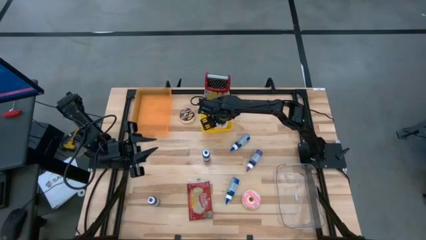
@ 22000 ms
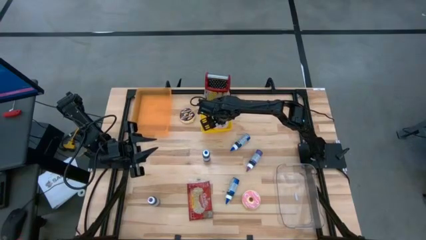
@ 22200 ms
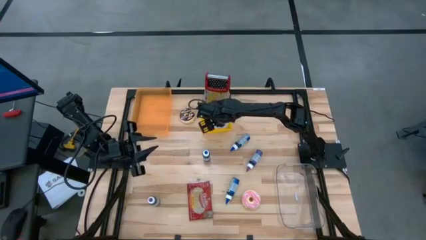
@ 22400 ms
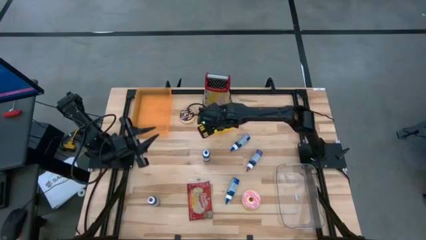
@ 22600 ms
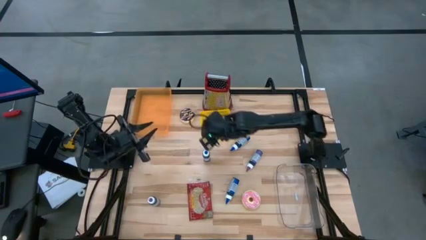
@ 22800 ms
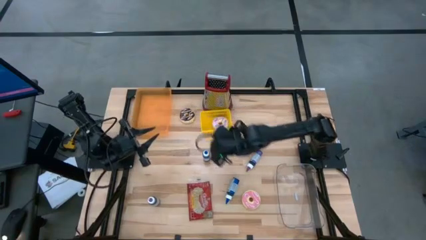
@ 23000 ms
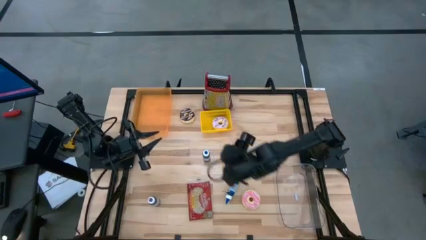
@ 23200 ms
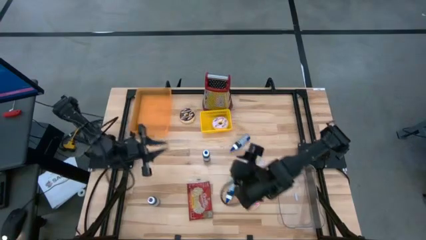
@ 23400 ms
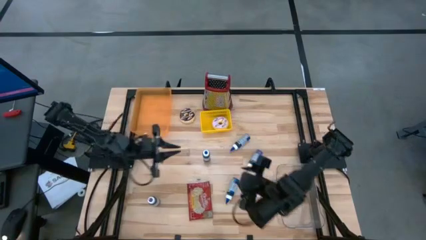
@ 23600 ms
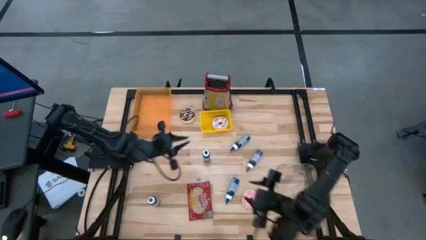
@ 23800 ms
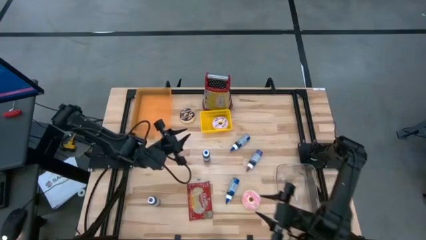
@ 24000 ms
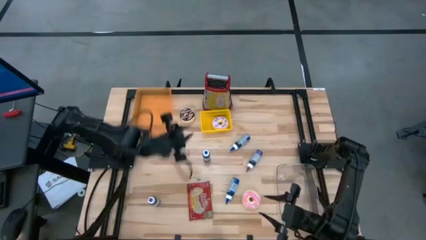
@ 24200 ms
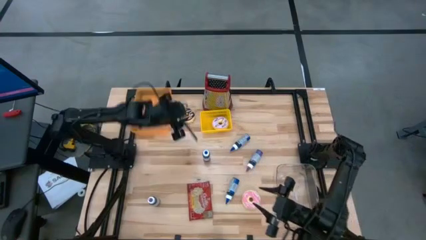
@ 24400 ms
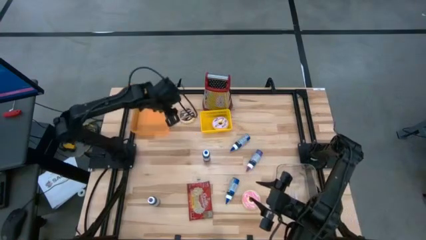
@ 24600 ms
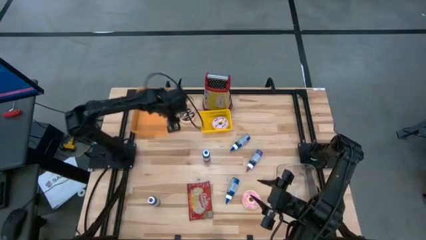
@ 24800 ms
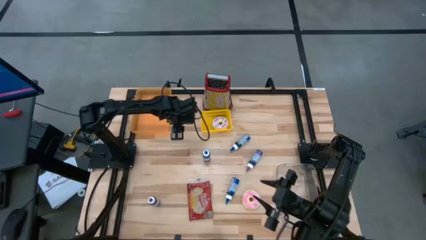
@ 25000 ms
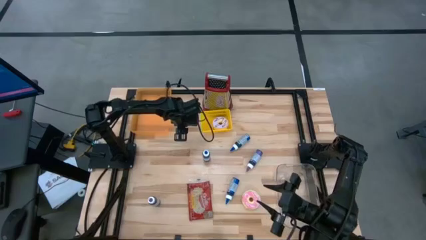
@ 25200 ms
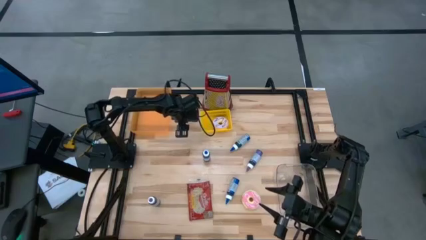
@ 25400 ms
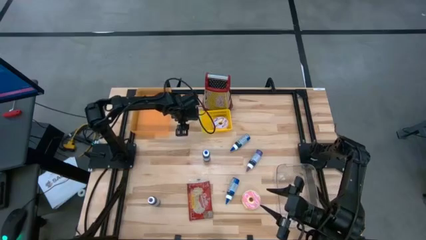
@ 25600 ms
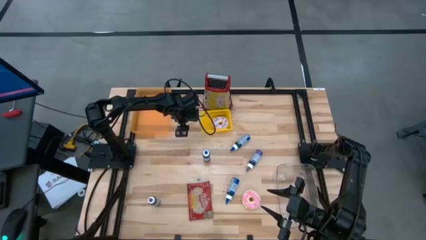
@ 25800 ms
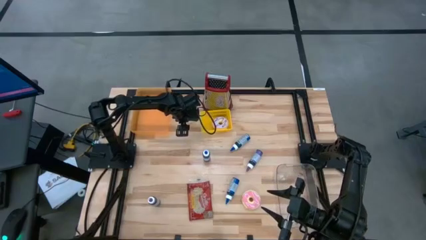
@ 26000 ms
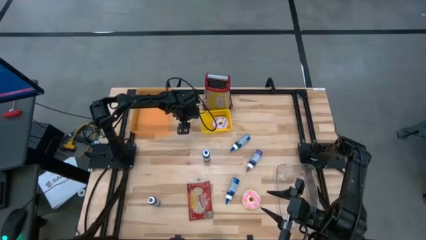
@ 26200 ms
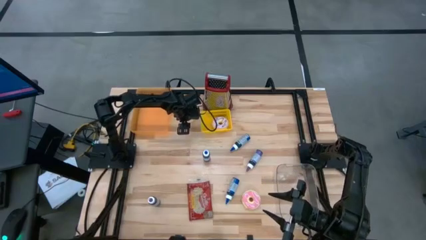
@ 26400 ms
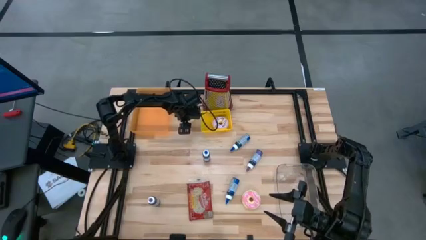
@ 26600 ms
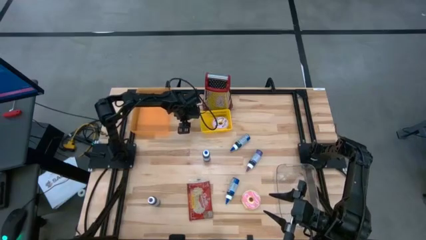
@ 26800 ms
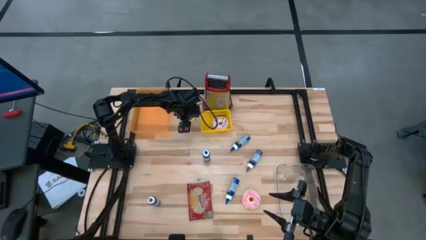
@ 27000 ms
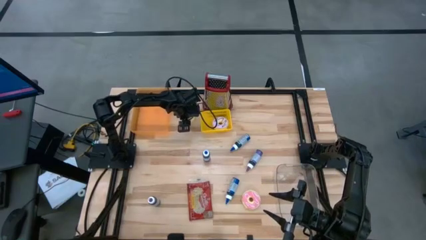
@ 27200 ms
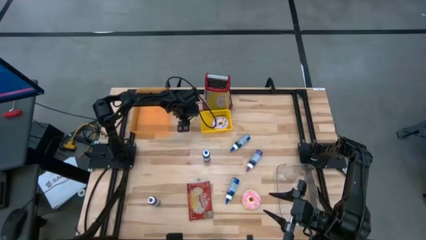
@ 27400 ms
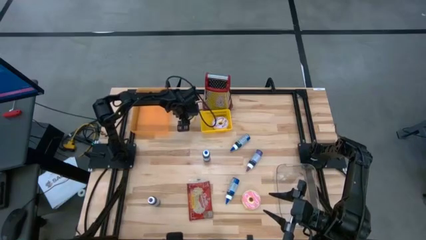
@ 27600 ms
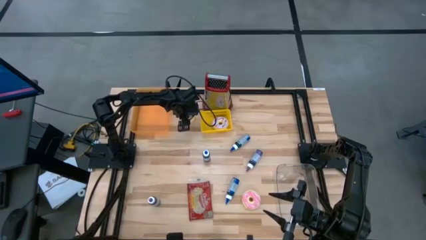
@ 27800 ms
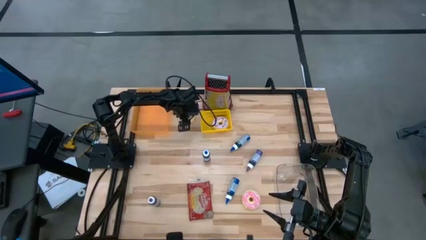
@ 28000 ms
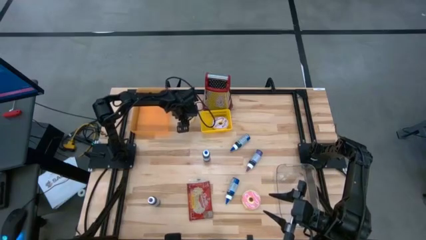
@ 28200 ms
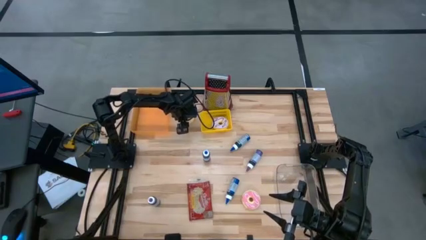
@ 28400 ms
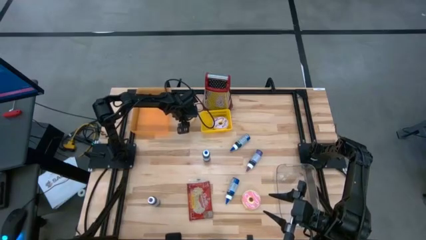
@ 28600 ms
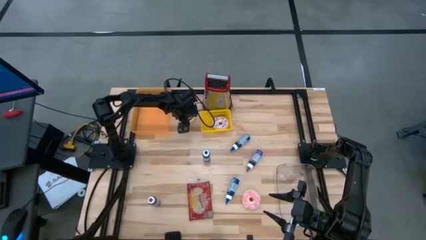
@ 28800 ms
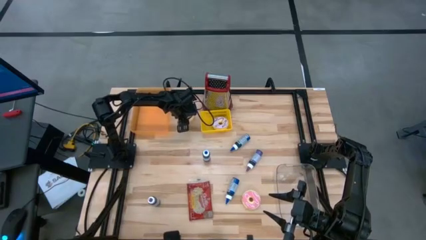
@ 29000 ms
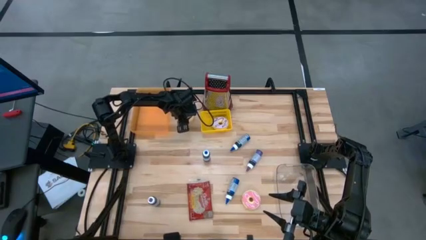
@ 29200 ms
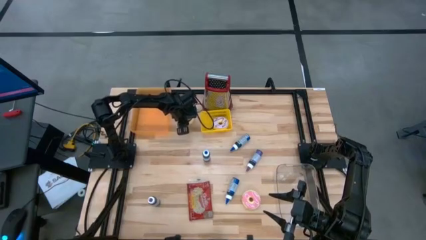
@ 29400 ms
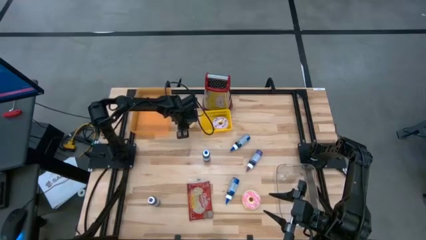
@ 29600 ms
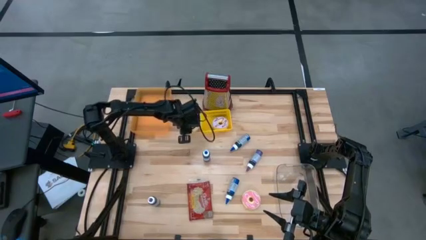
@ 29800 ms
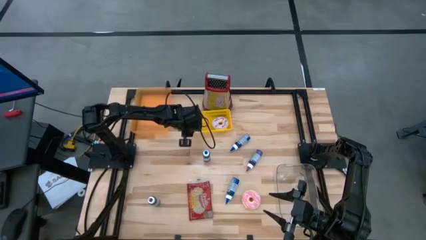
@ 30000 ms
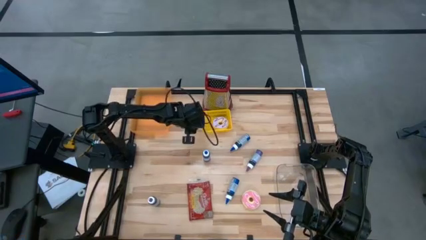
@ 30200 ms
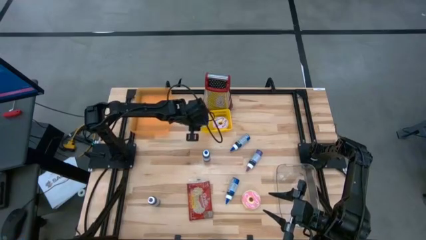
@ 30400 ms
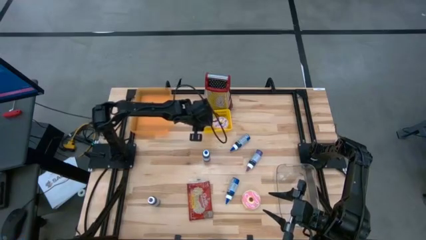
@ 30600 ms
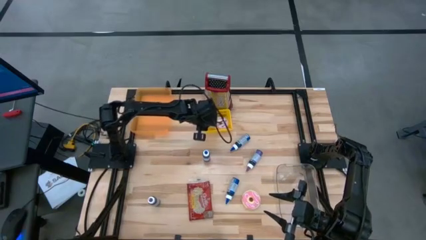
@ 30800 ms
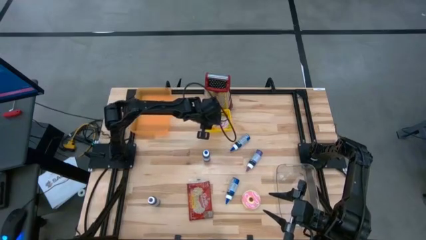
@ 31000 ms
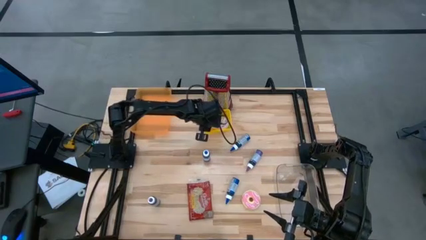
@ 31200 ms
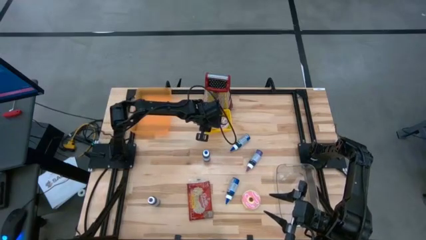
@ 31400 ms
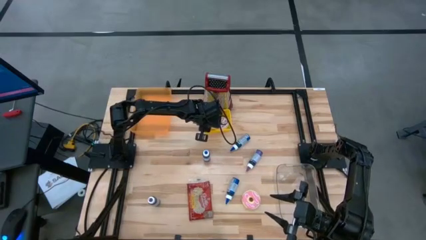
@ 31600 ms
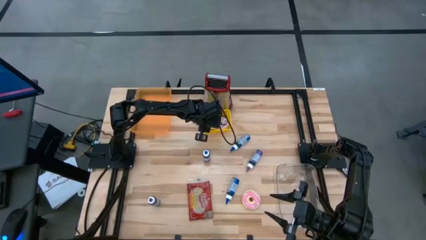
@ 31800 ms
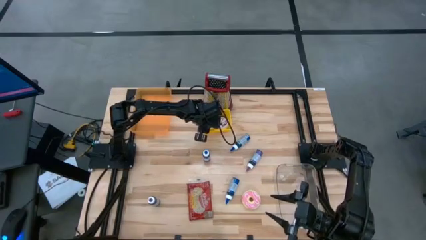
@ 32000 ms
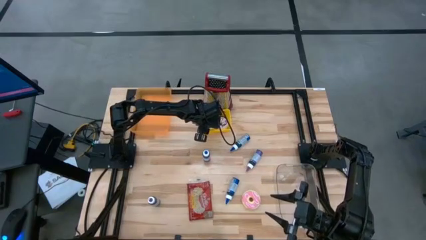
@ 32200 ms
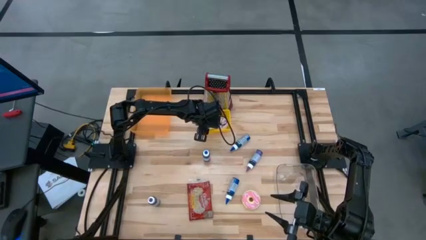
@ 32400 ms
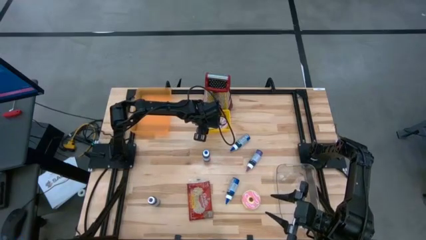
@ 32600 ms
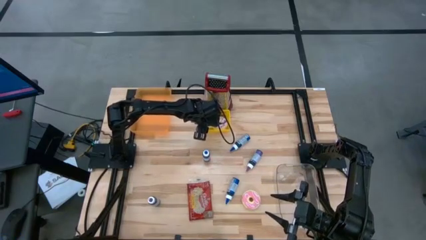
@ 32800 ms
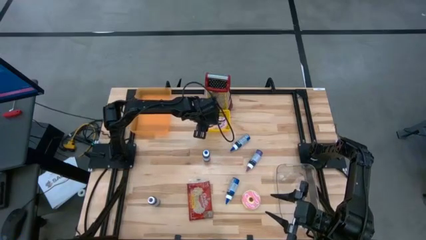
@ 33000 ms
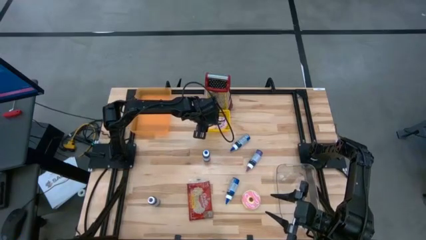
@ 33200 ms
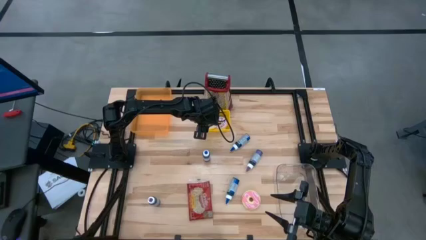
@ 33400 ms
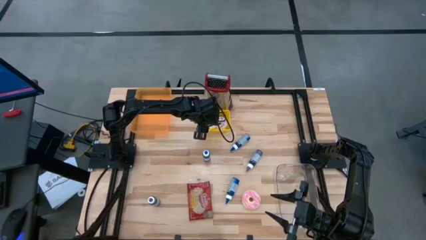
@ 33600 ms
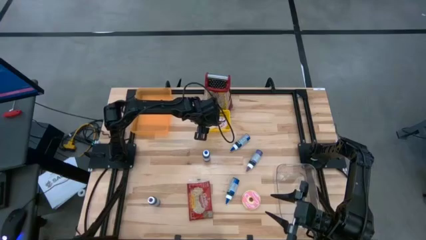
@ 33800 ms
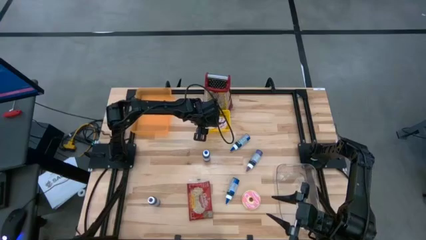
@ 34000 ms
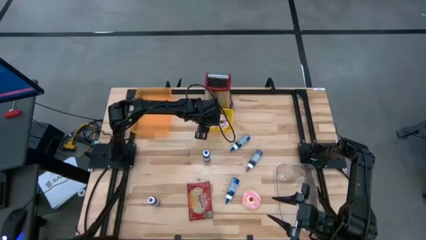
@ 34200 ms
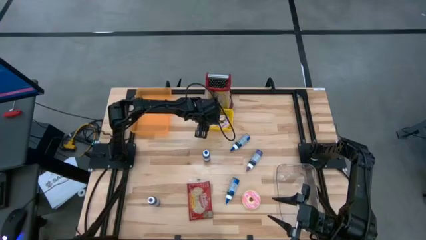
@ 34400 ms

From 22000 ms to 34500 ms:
Put the black donut into the yellow bin

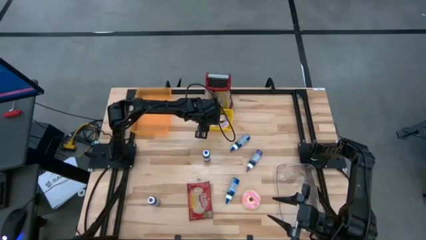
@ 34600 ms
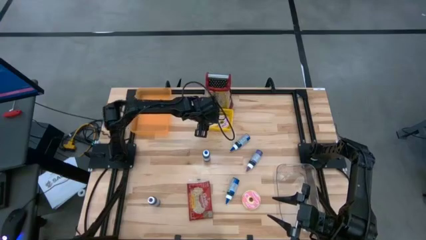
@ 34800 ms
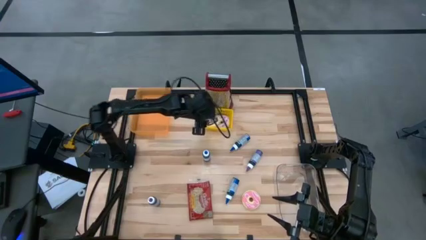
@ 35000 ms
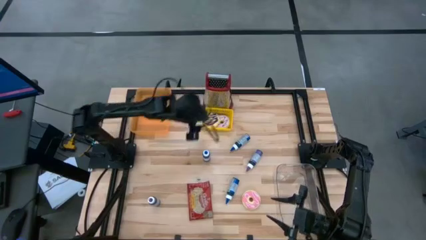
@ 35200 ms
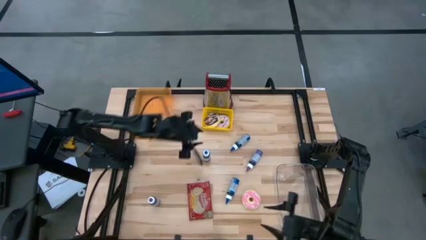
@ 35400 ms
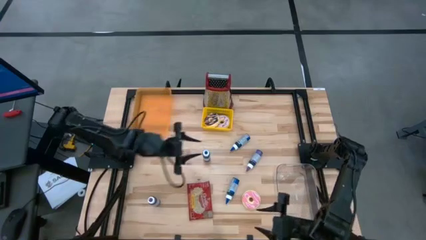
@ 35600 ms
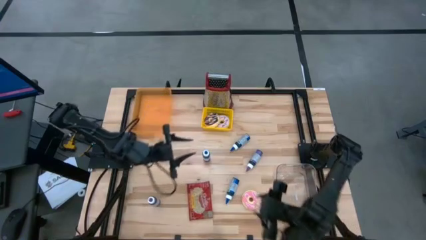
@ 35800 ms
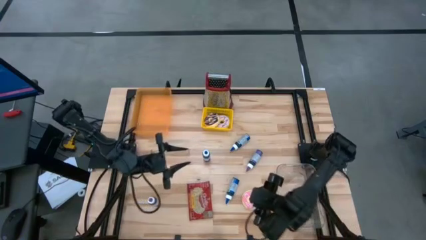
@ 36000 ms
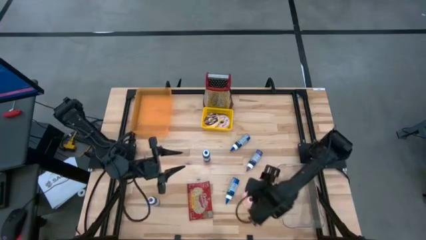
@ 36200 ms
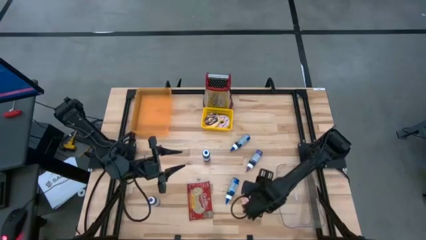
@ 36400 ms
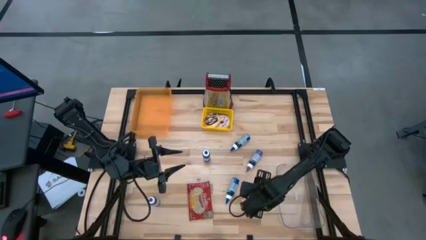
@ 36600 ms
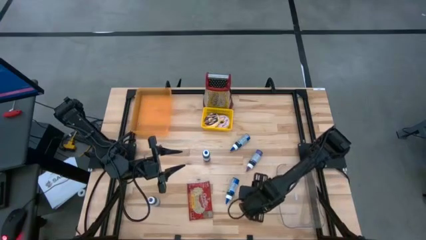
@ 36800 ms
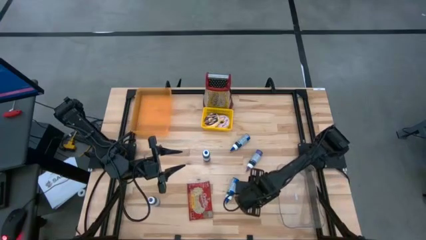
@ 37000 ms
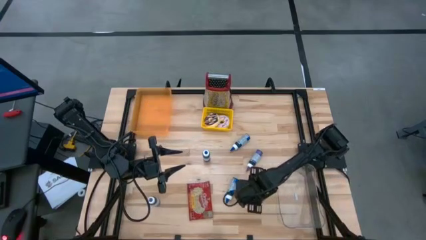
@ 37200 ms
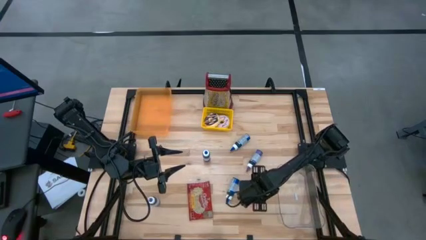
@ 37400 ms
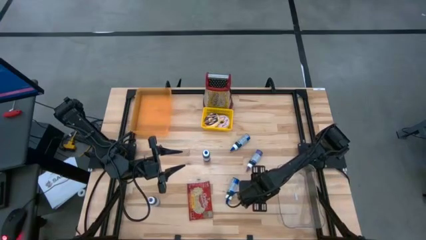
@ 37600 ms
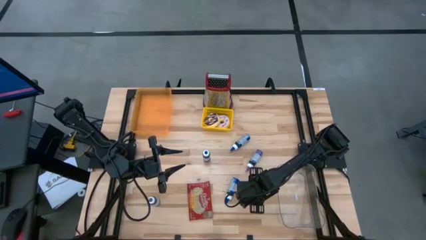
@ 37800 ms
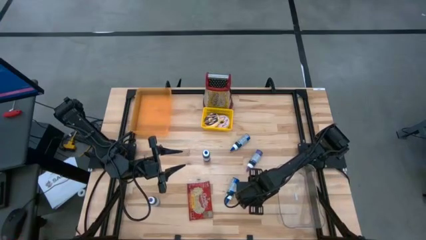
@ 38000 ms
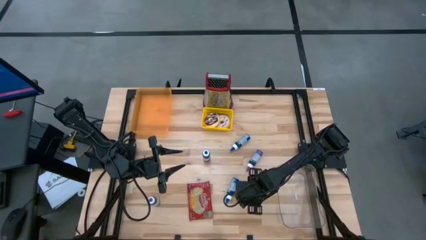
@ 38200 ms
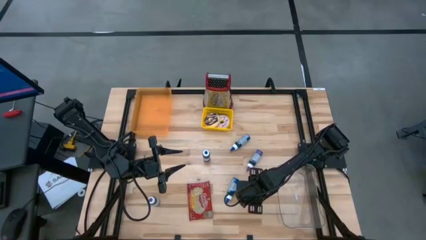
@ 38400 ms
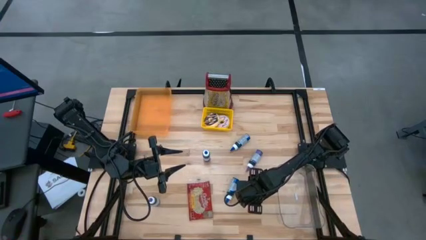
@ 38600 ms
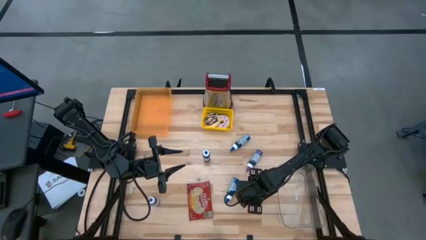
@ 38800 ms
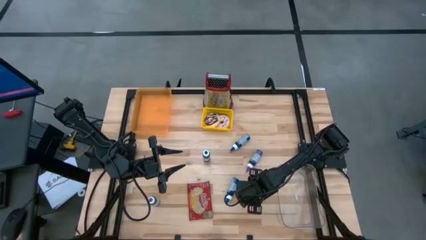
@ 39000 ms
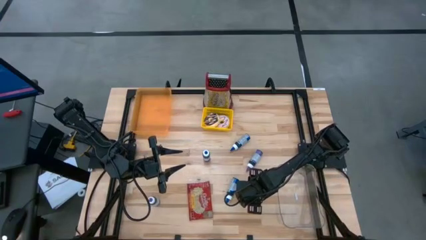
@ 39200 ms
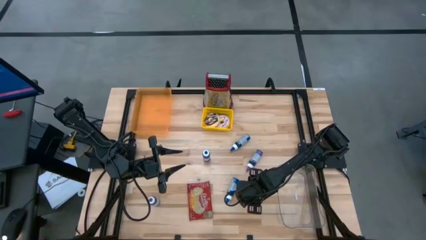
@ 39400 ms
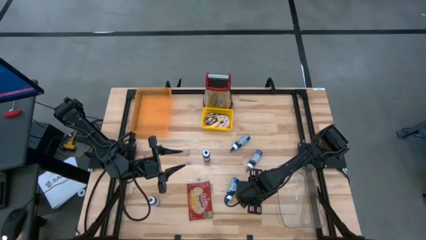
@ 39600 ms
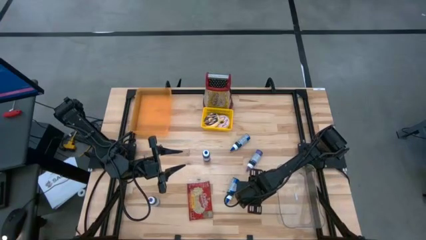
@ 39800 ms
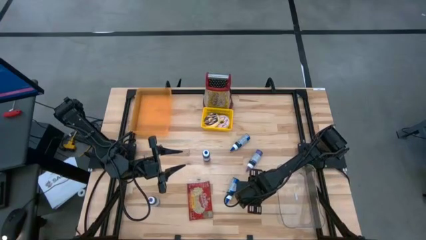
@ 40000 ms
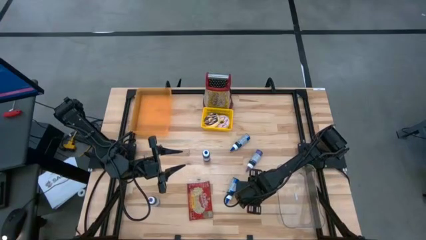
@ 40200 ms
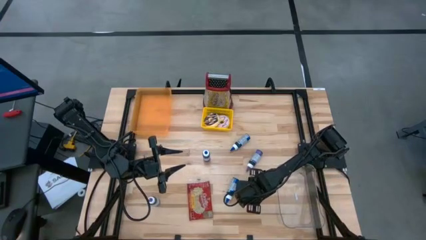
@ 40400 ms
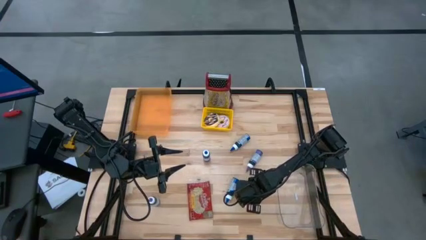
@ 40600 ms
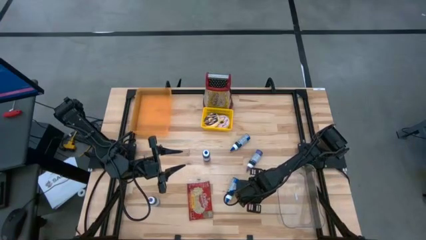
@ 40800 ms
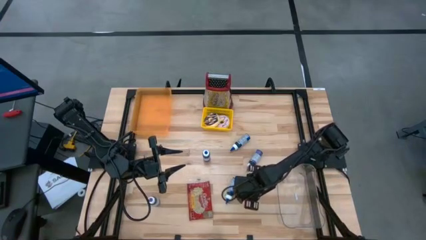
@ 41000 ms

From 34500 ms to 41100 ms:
Put the pink donut into the yellow bin
